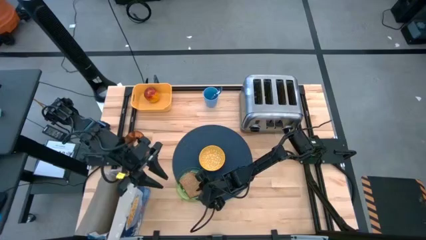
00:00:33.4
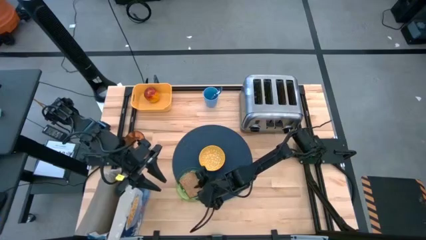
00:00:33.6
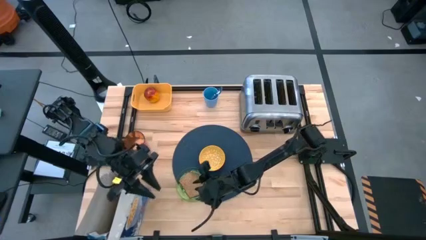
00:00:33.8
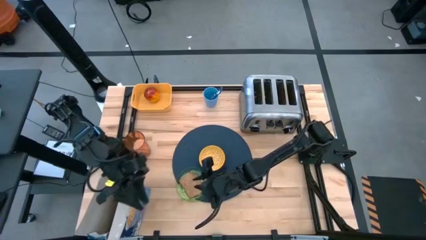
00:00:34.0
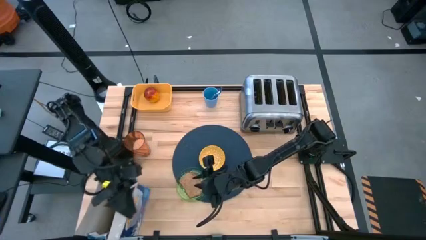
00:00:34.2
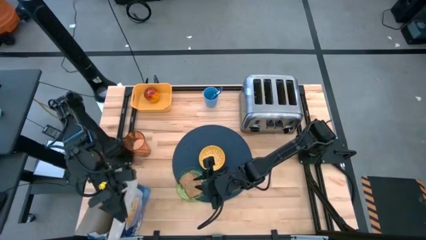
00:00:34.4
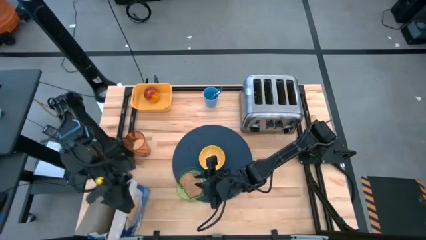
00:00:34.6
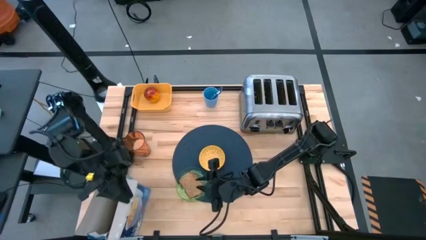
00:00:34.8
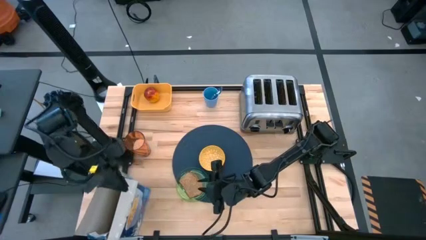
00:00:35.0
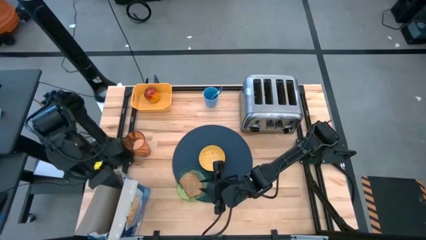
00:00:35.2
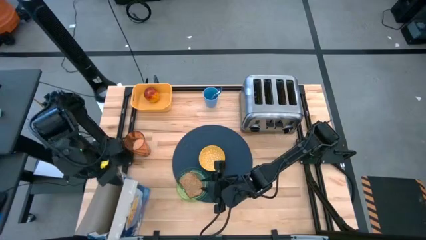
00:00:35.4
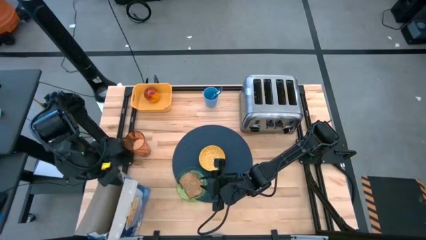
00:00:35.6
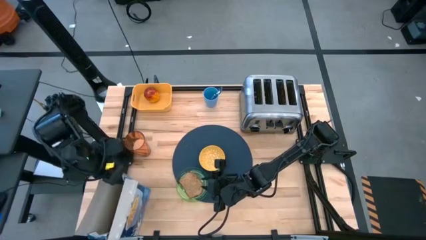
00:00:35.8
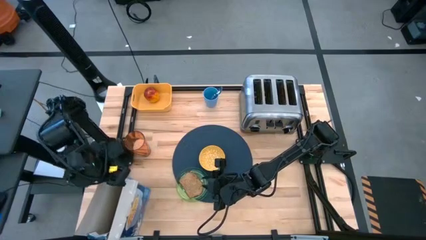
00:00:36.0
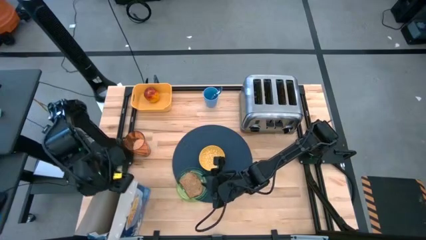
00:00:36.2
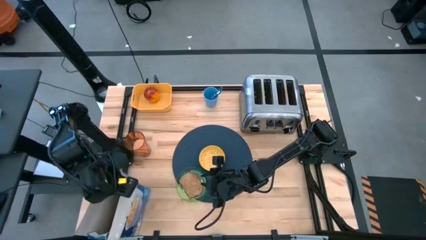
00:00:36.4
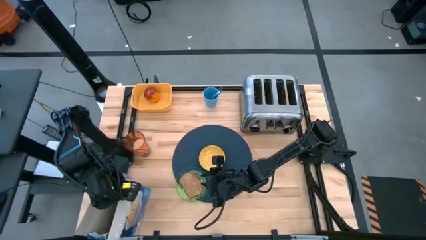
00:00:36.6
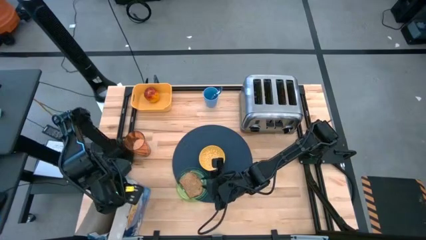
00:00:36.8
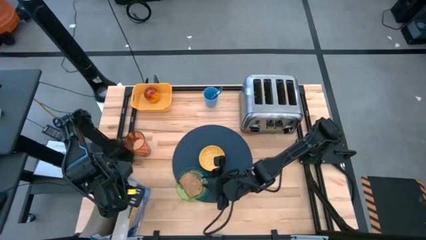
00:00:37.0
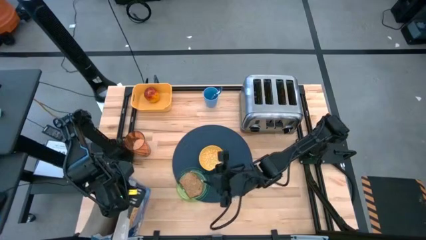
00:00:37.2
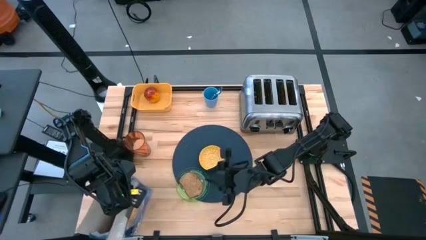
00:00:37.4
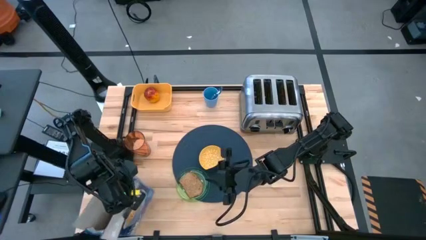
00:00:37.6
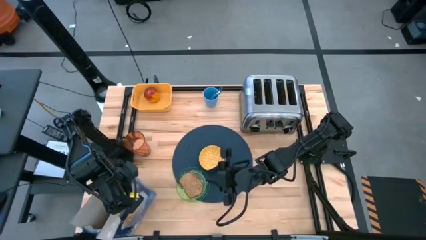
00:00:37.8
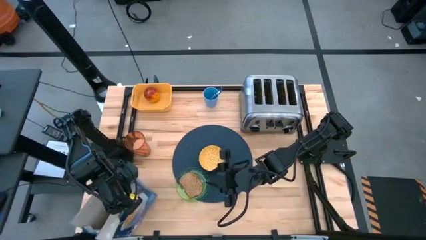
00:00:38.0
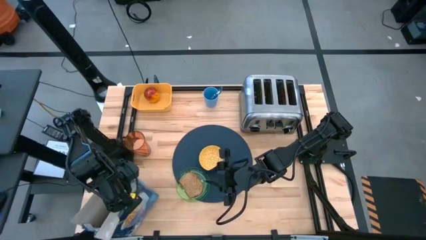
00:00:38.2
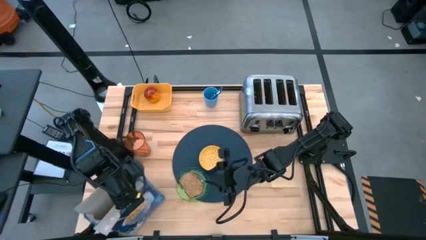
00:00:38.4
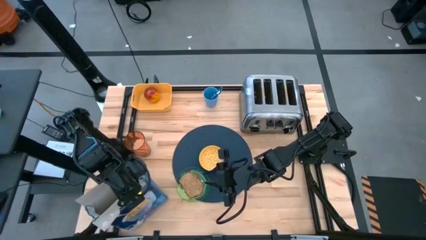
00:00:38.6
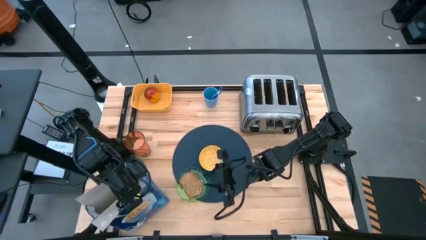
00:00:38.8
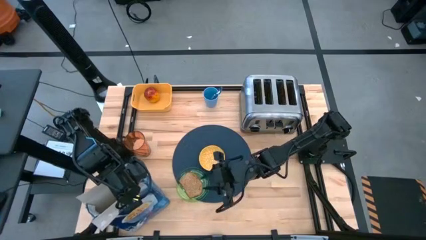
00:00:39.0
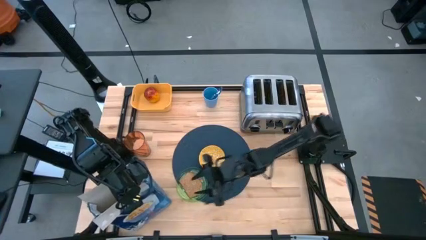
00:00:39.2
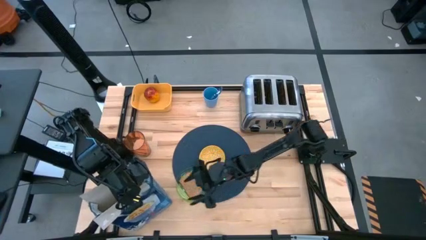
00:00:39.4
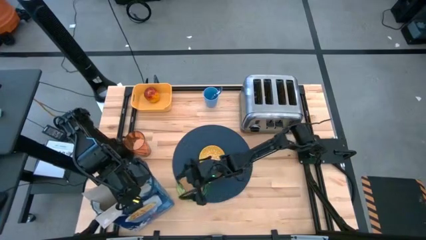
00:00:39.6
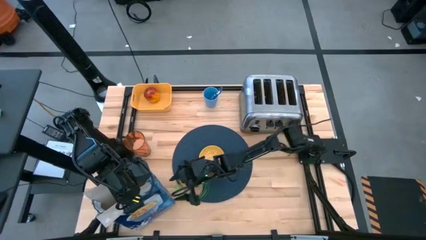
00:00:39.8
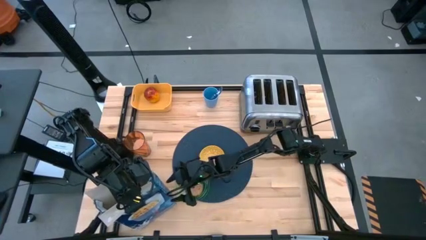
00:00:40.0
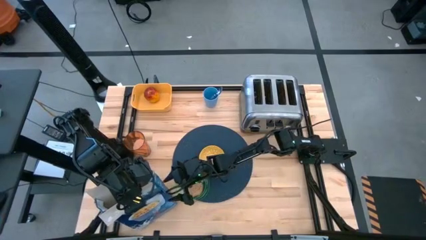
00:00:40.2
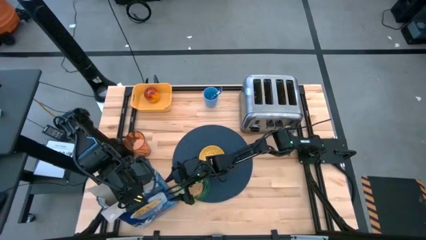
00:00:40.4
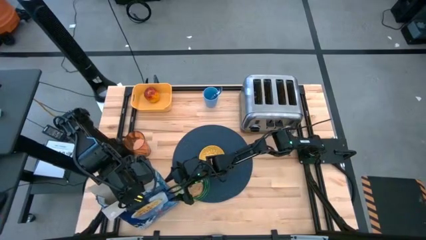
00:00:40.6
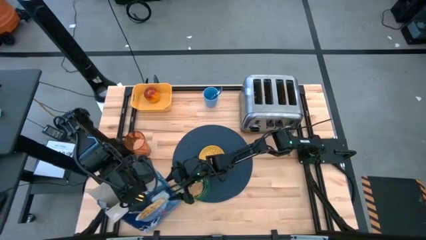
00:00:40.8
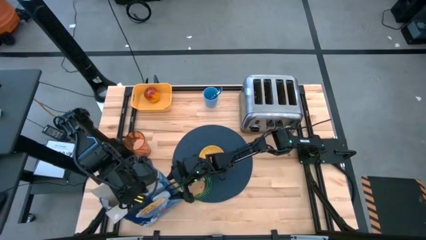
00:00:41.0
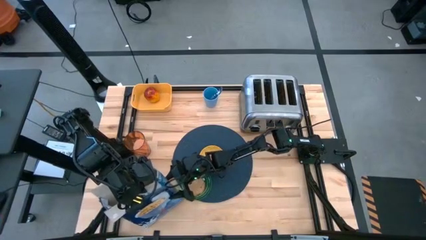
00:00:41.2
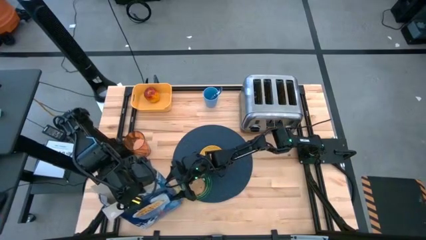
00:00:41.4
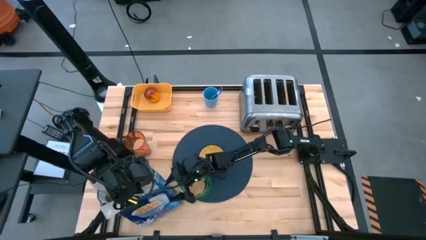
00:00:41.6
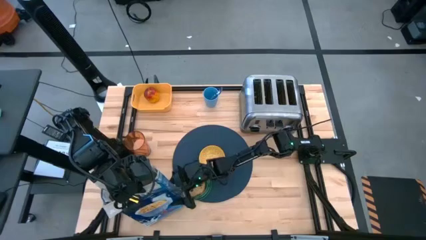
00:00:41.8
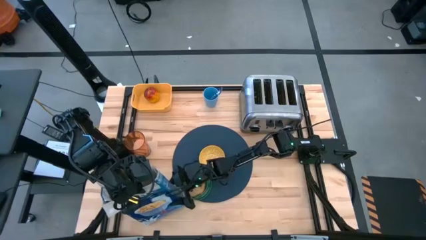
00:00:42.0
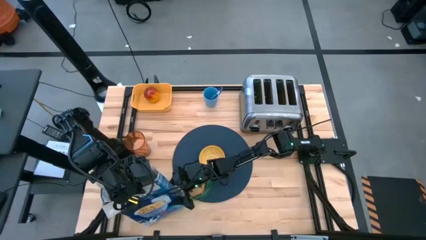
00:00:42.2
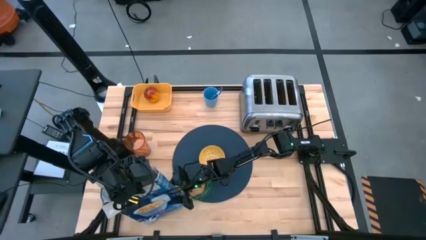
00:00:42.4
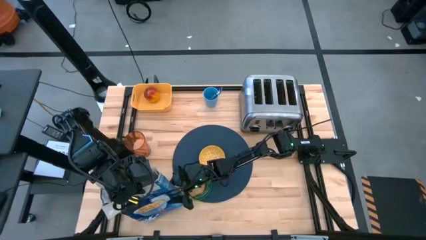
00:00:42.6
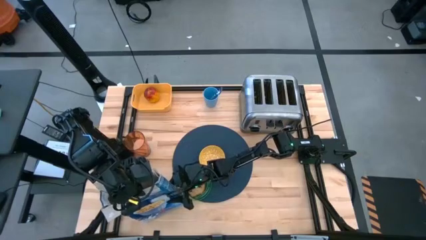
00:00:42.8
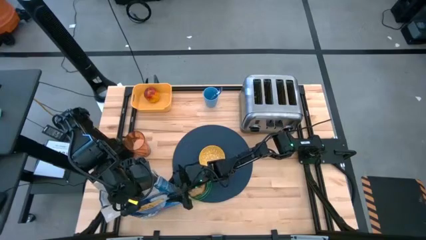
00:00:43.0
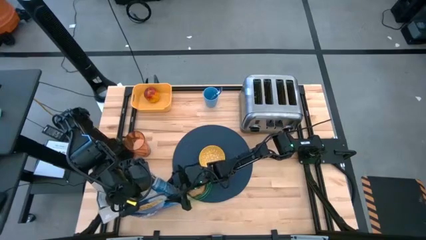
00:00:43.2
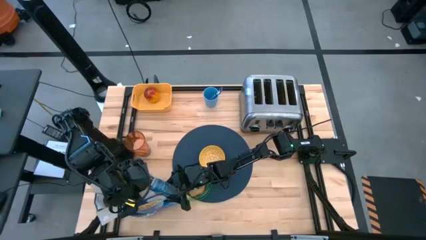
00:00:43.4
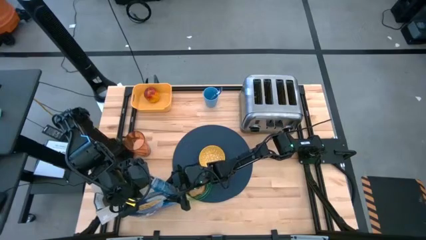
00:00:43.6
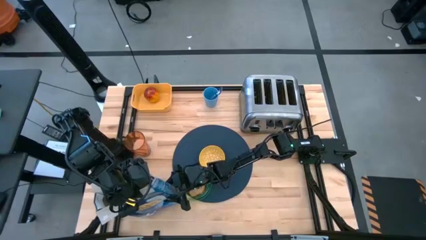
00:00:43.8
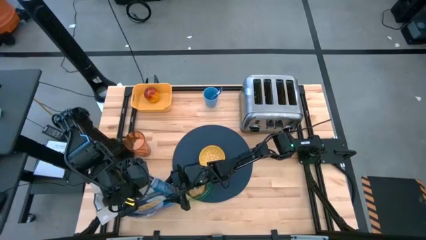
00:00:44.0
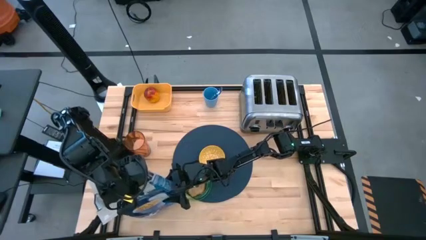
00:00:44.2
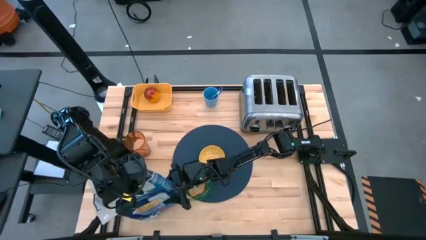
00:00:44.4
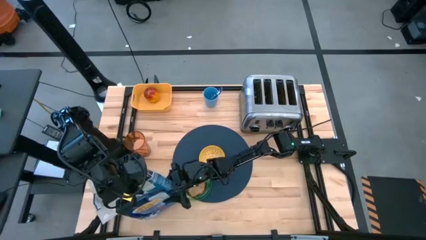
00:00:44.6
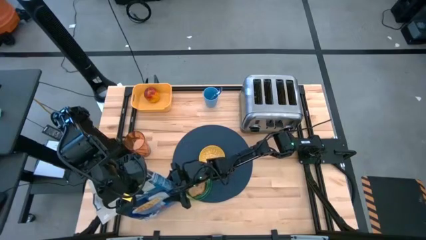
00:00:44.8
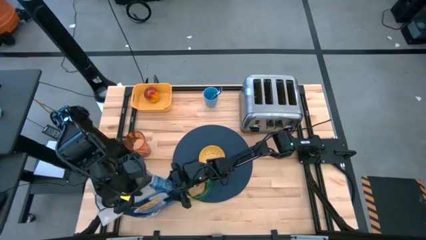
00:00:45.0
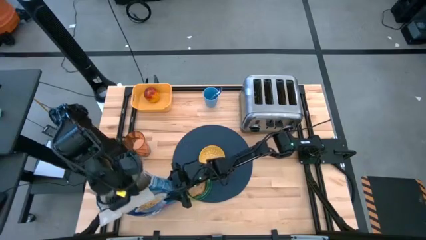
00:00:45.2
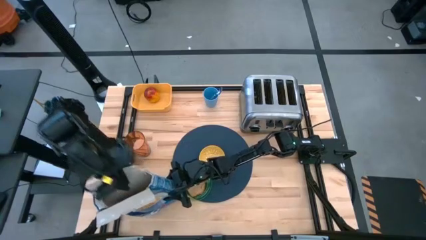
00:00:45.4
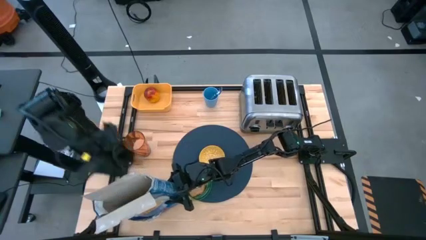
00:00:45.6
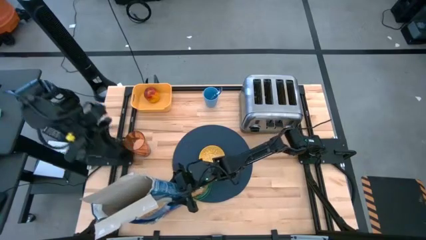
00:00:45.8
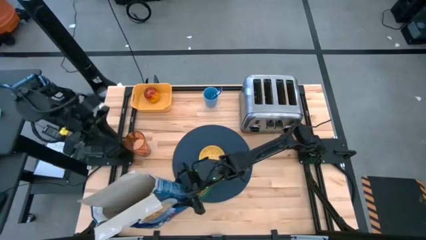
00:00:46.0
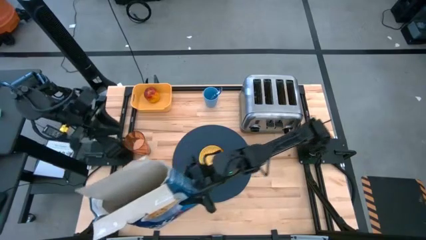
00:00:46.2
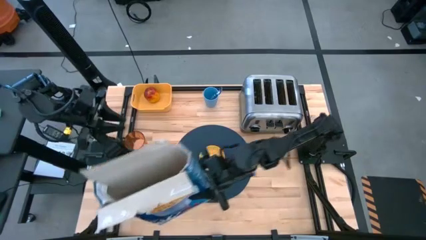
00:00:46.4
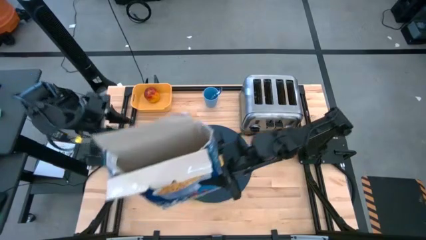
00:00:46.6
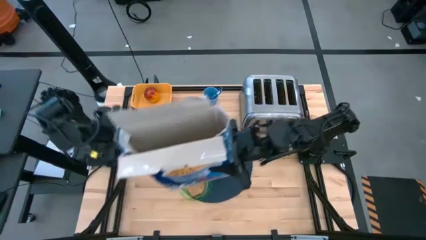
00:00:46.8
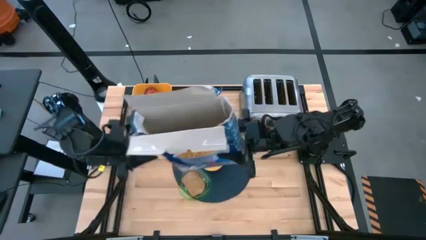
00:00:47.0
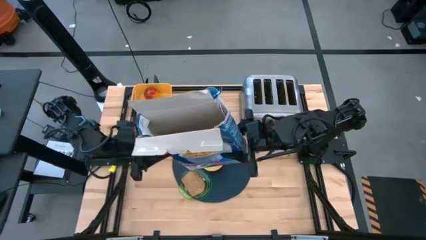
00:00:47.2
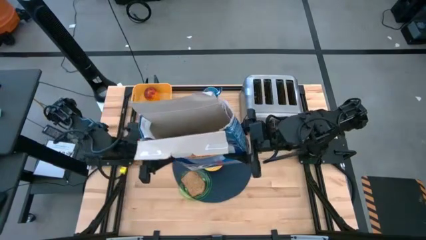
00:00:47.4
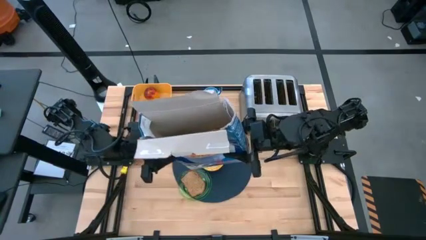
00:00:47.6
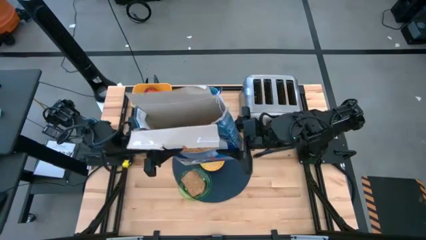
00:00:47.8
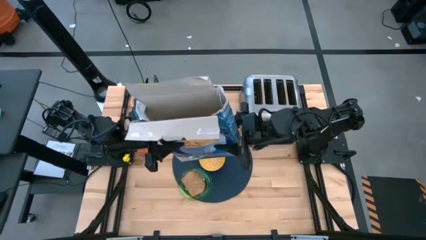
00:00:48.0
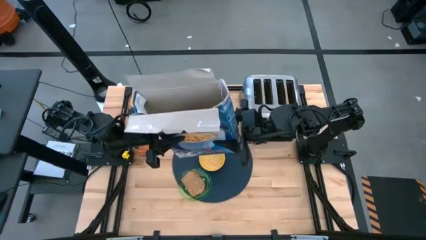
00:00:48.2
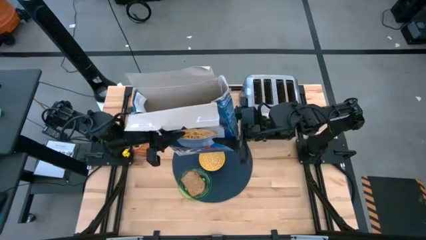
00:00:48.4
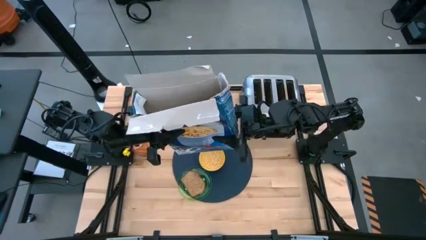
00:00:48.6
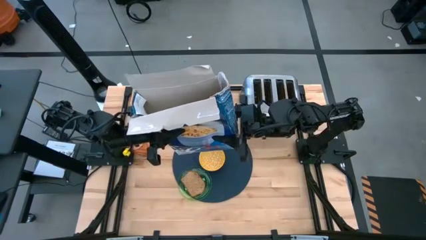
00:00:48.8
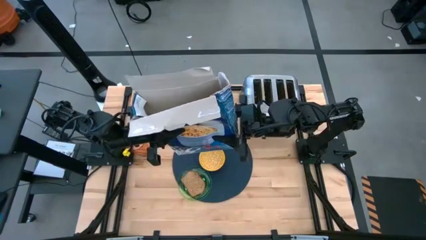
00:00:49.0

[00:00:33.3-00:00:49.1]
Task: Arrange a breakfast setting
Pour the cereal in the yellow bowl on the dark blue table mat
